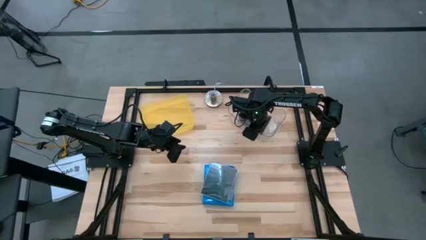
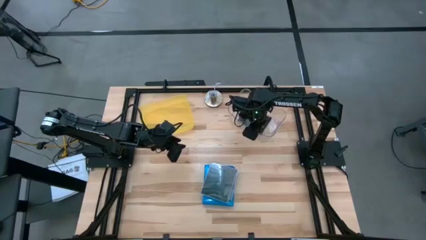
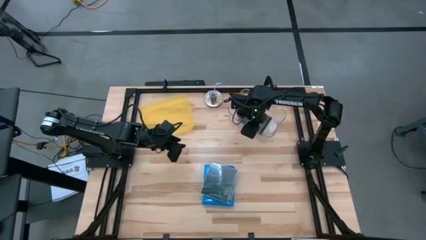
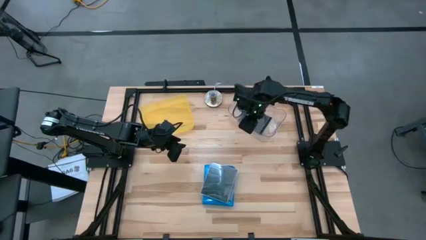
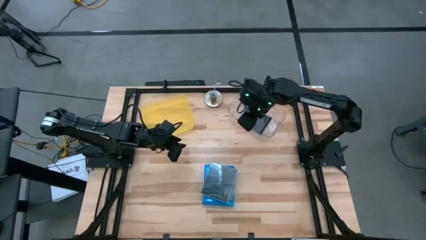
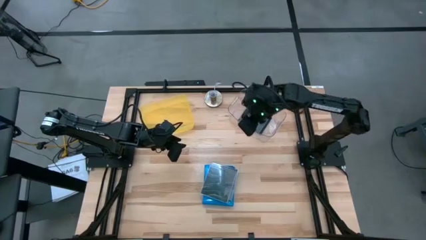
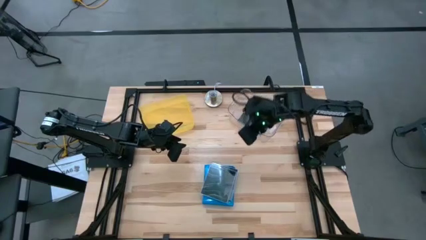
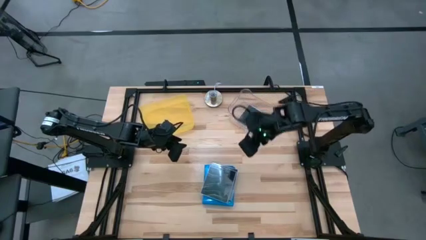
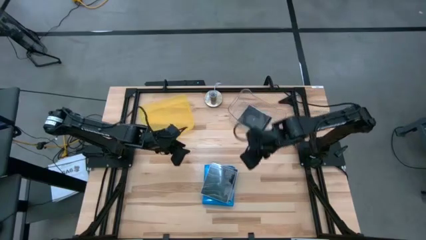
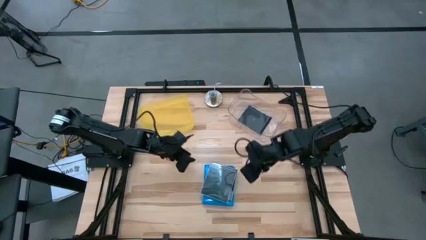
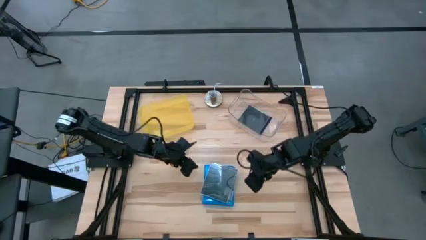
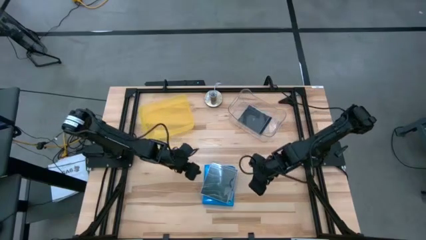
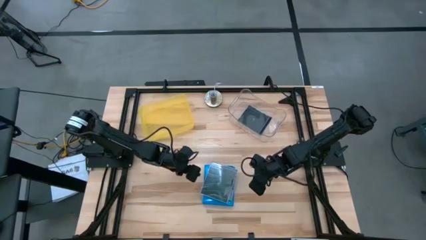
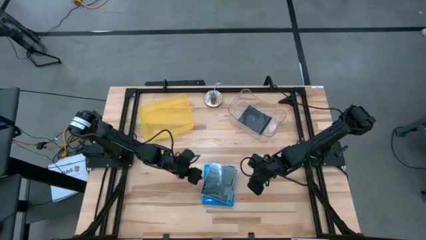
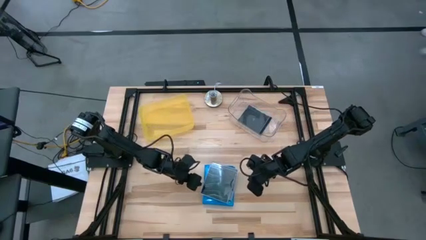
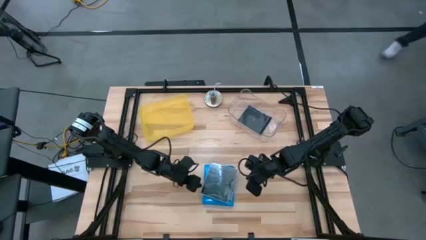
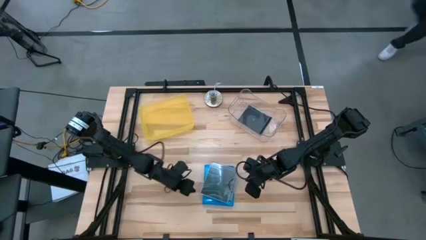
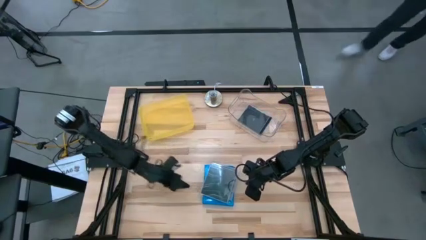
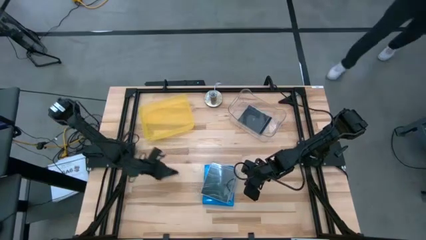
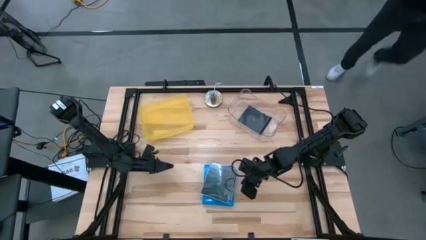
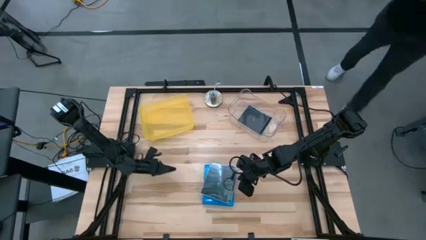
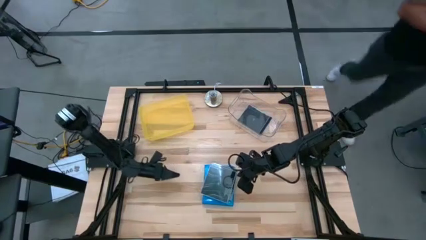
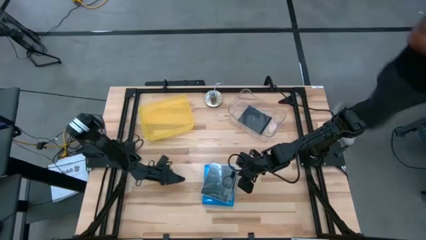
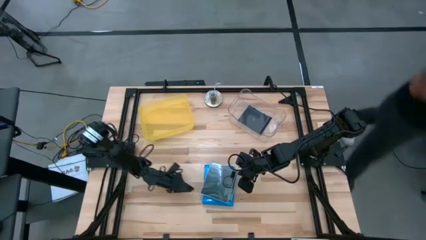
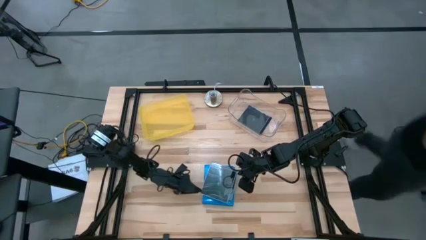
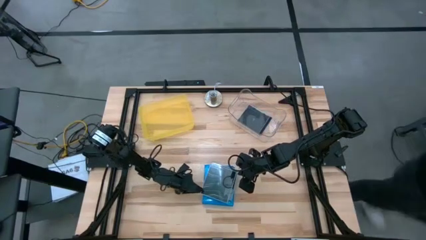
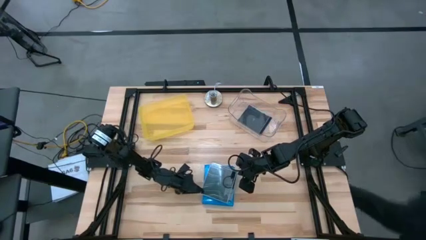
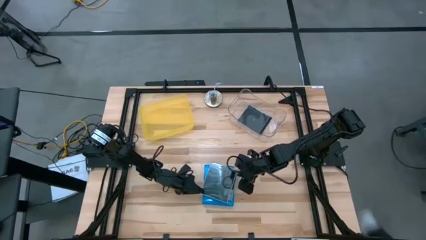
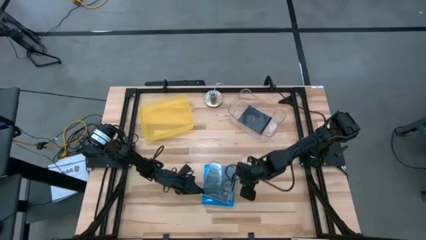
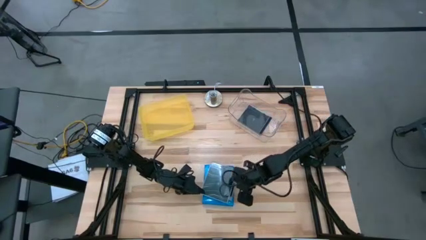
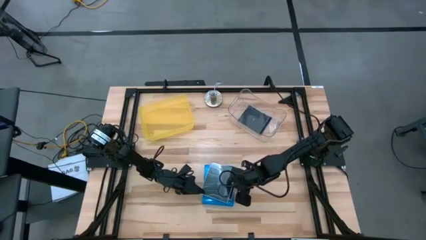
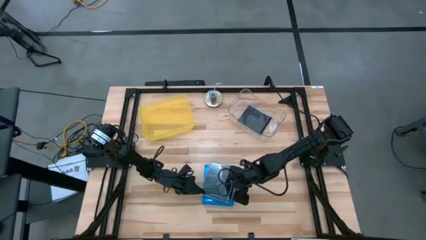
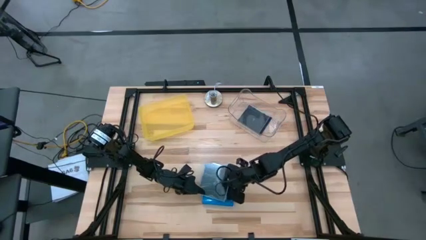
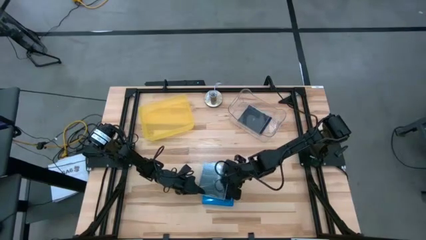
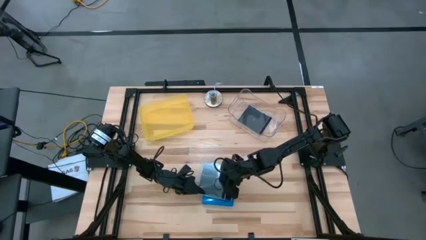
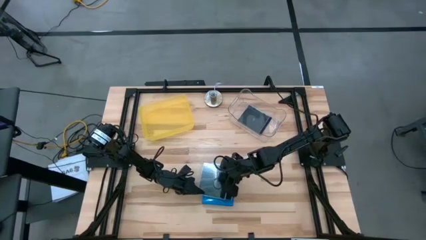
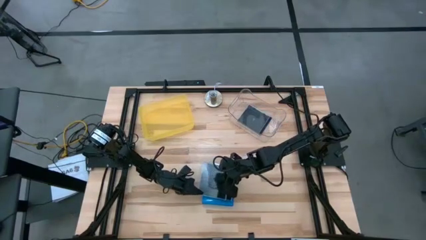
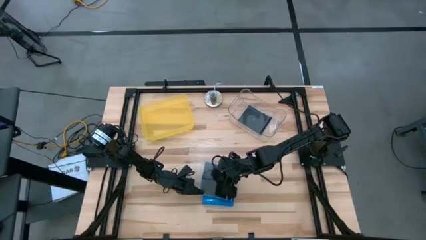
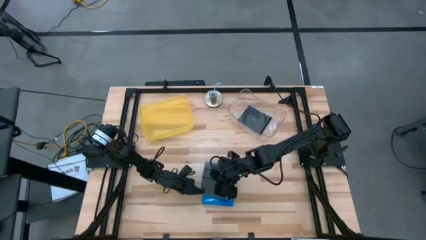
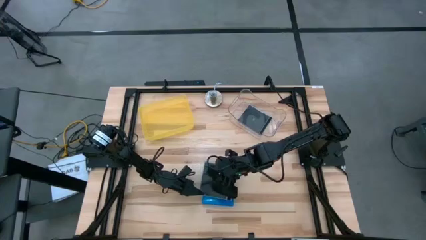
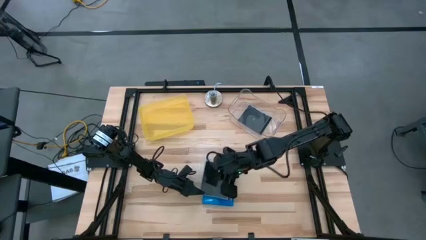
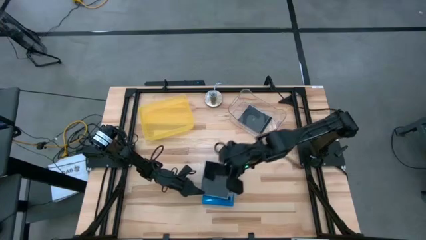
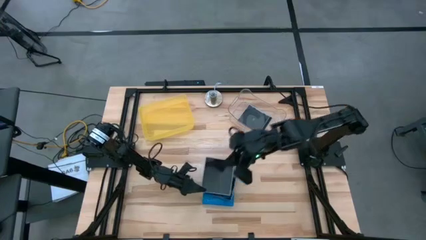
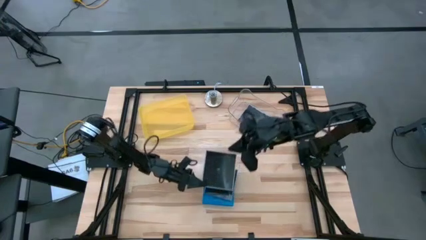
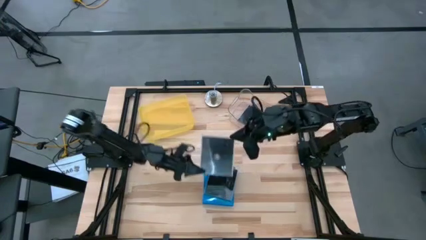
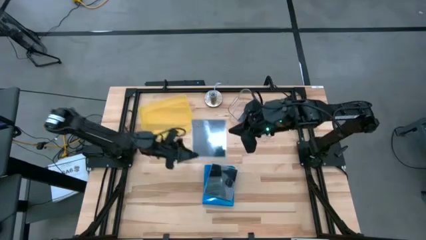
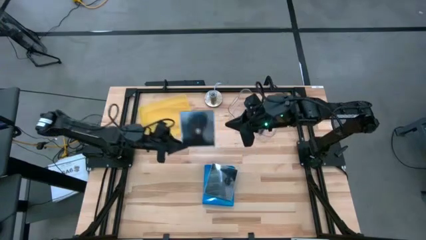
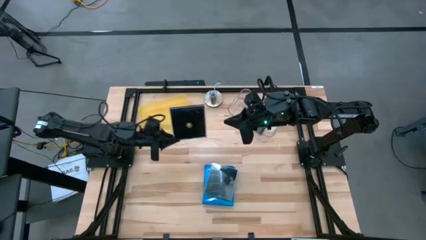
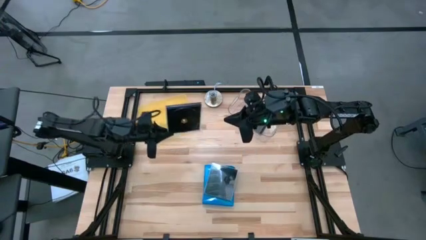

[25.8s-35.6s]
Task: Pick & place jewel cases by type
Put the black CD case into the transparent bin

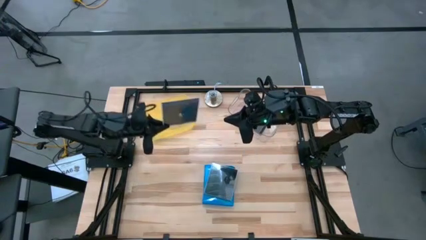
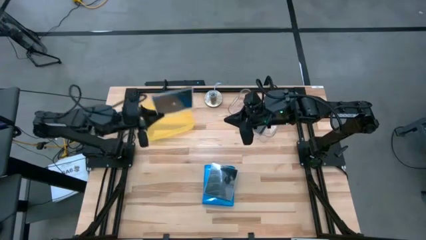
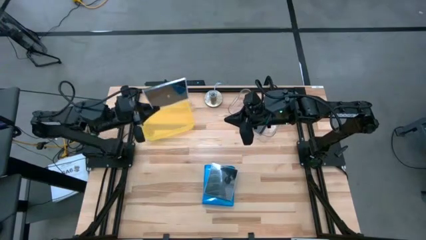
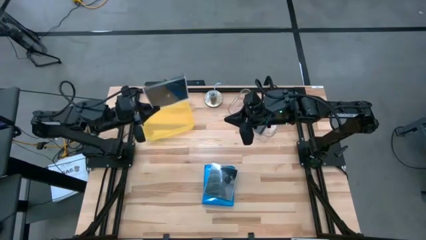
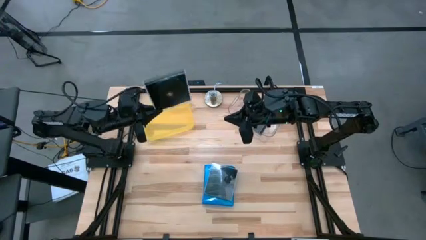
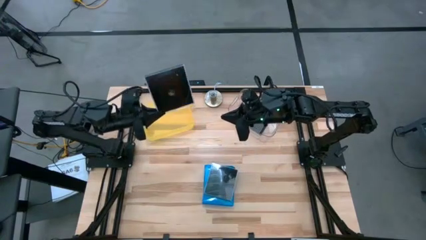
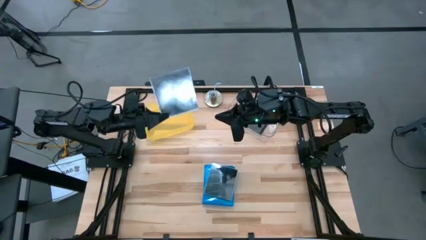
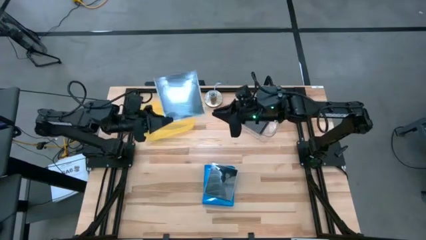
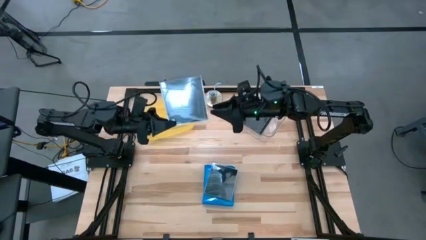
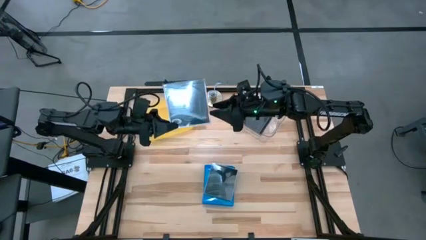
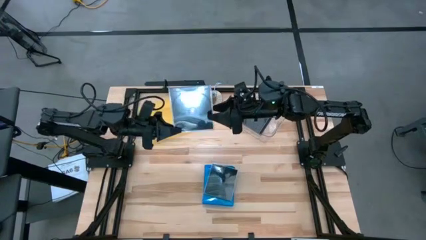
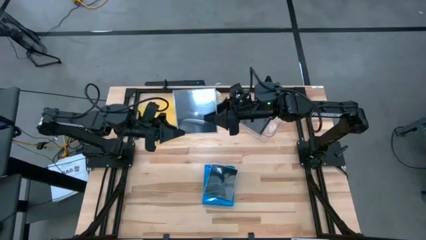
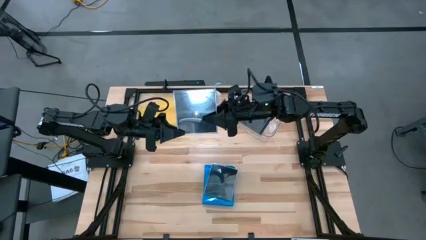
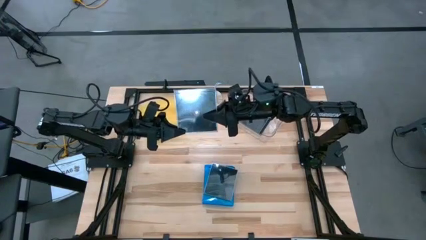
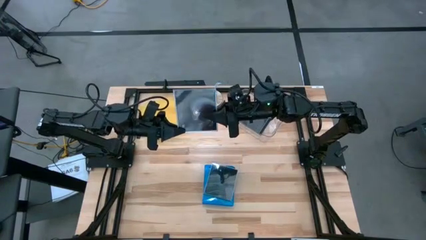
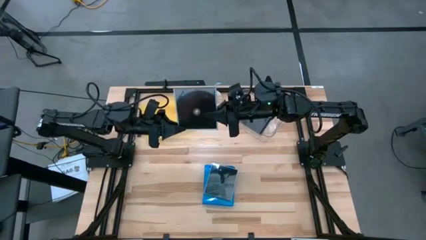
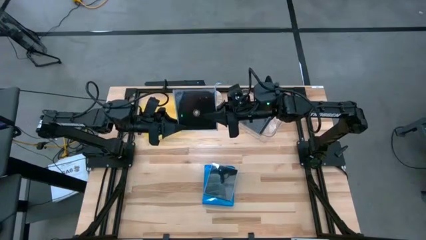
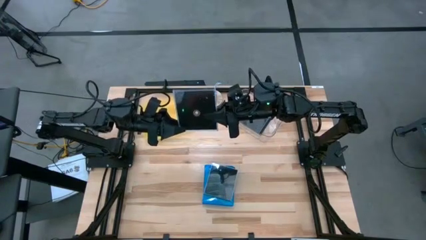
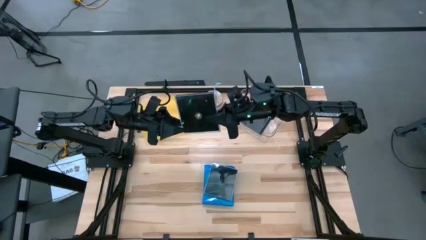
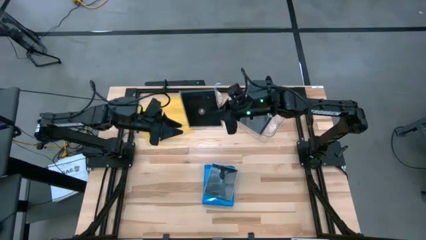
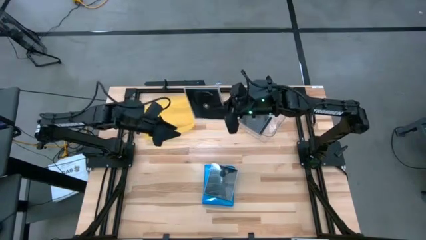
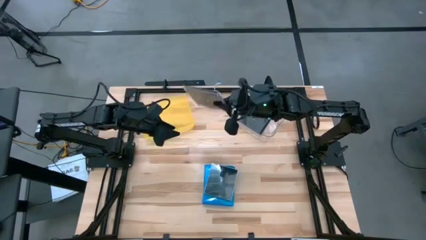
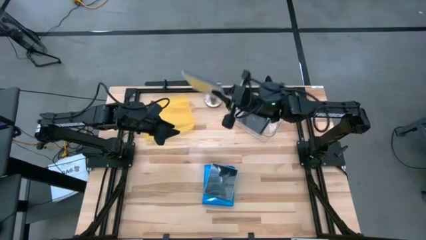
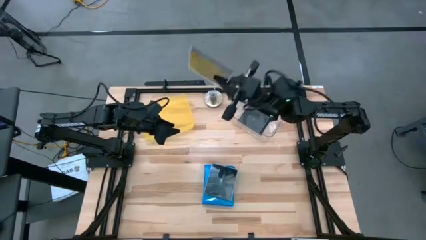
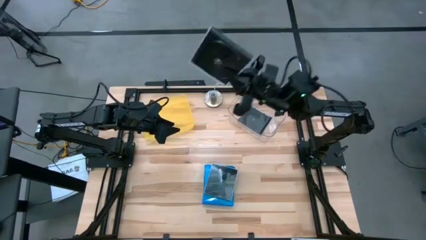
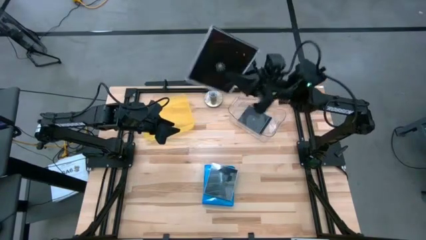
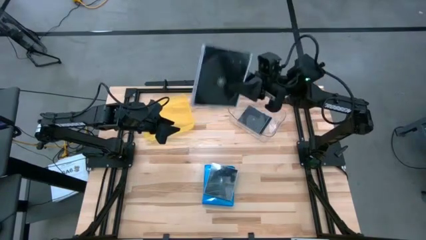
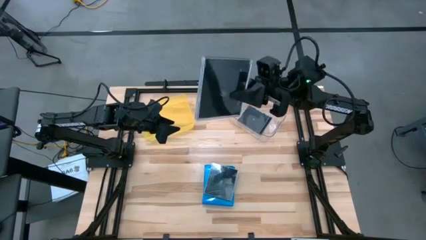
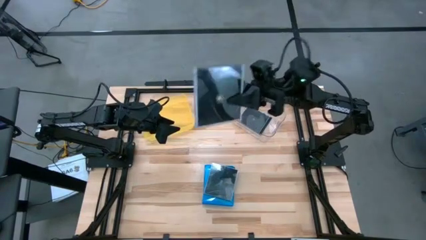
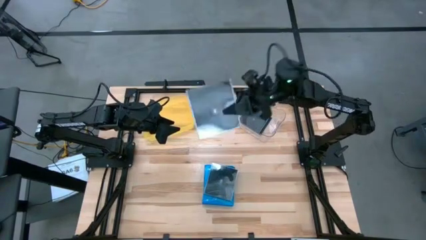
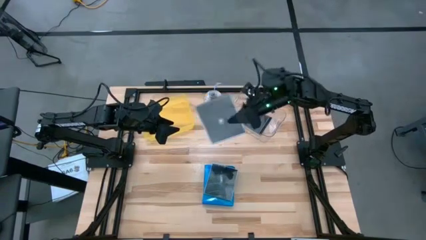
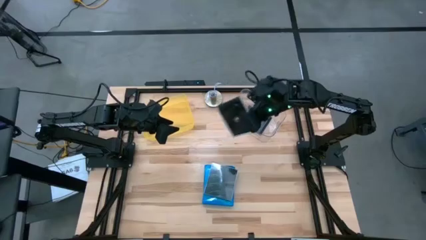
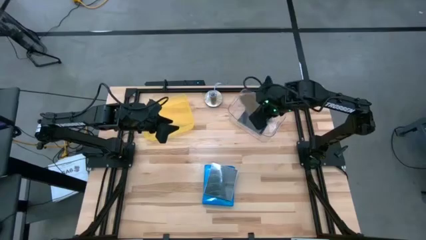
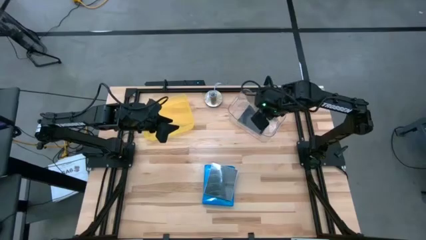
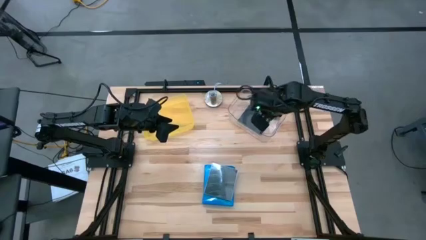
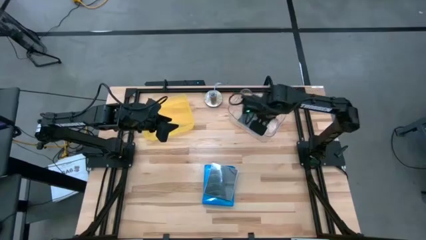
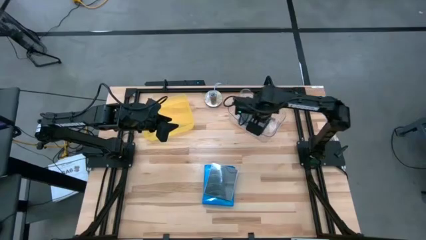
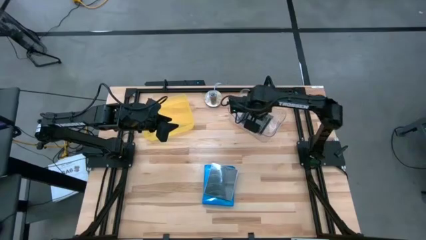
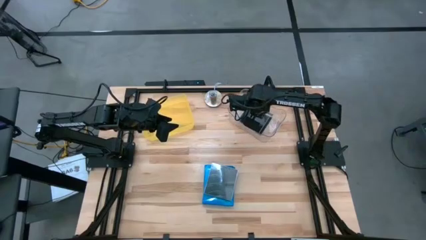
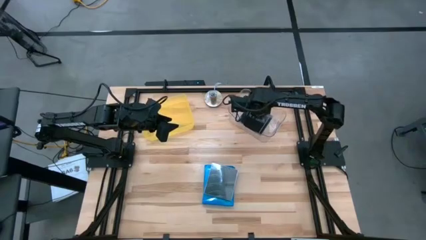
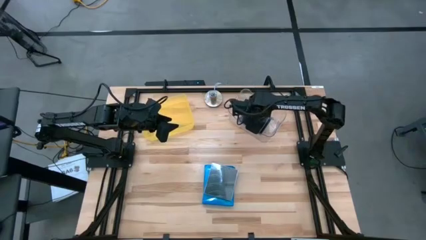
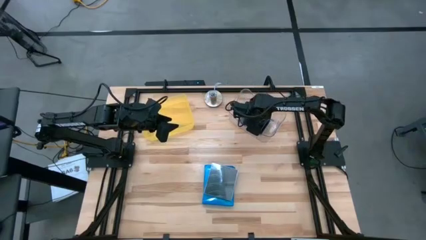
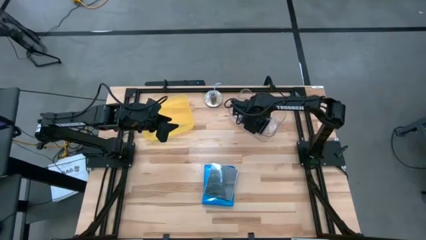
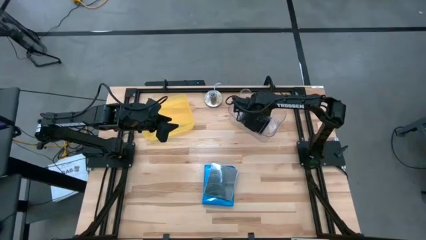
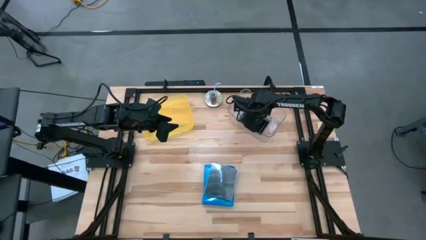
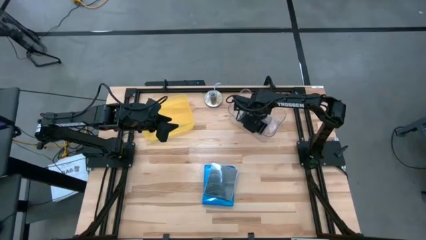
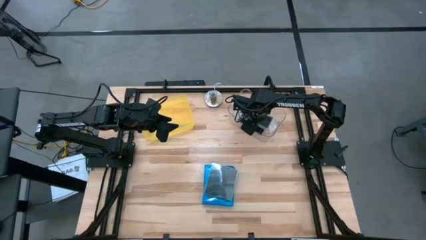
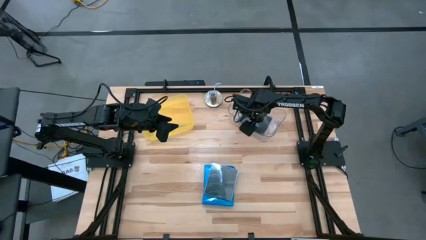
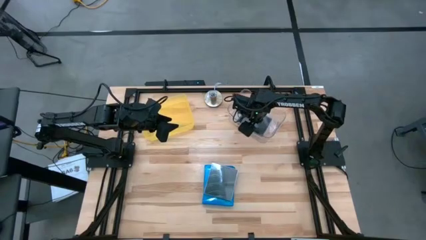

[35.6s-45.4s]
Put the black CD case into the transparent bin
